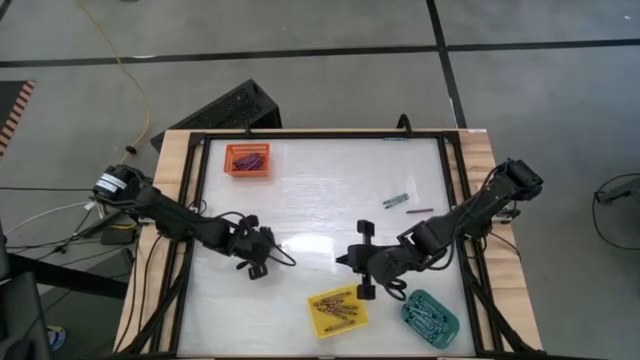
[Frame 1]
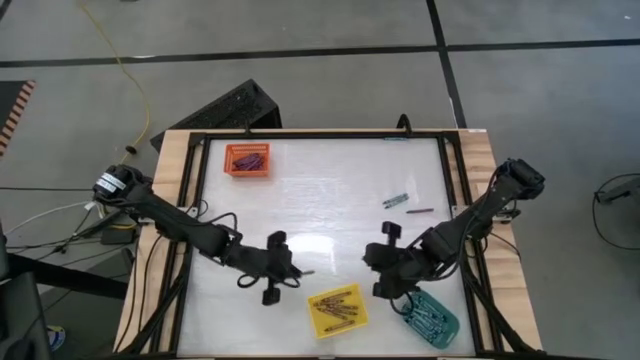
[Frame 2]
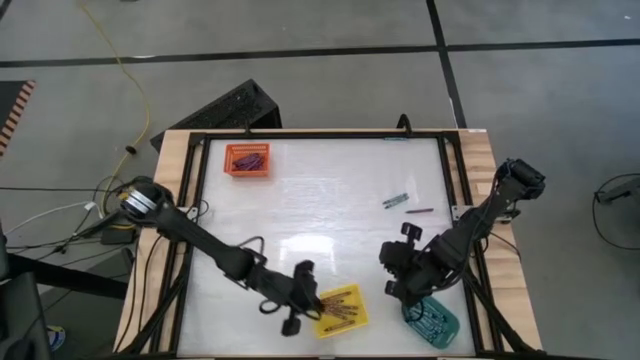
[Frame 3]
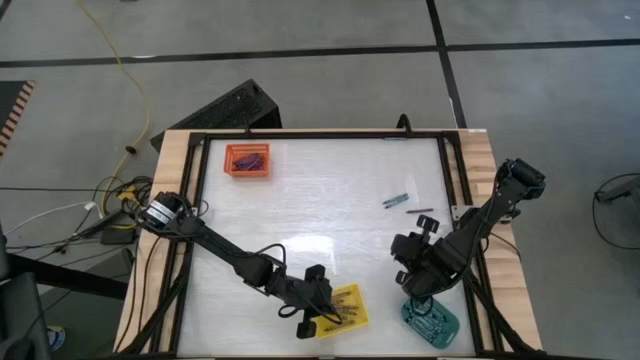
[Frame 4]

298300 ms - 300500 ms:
Task: Sort crayons
Put the brown crayon into the yellow bin

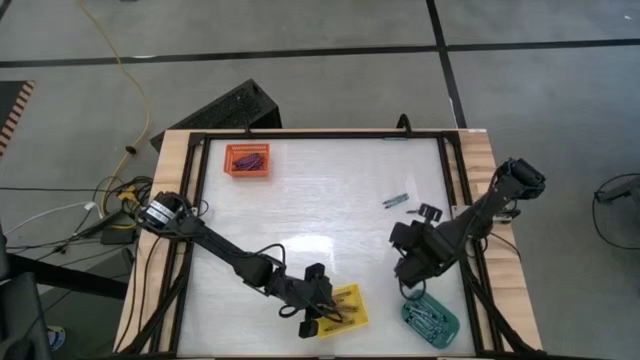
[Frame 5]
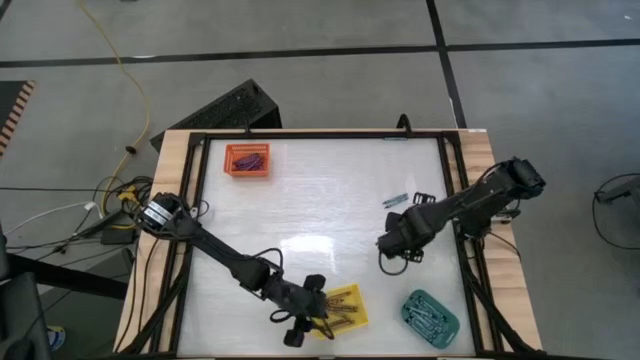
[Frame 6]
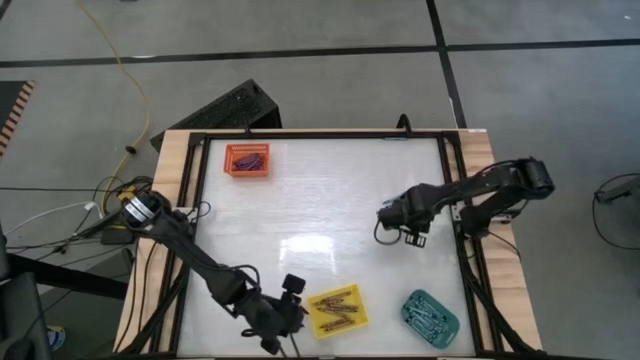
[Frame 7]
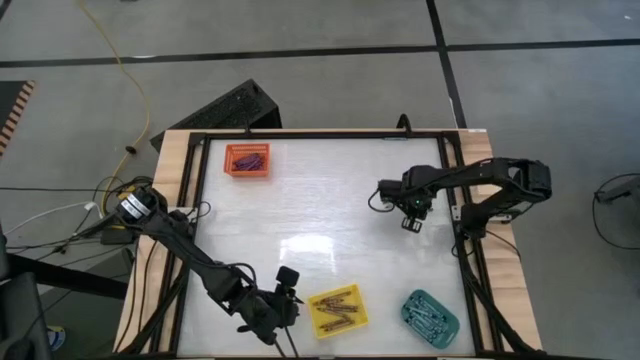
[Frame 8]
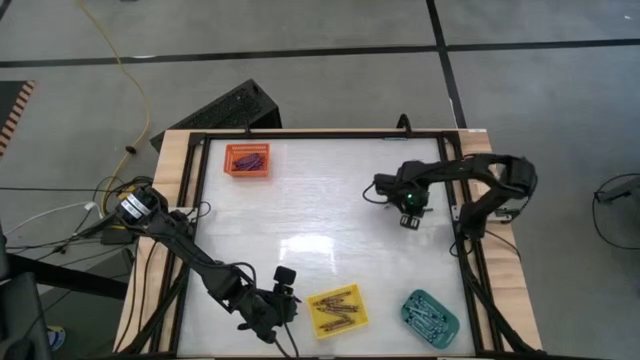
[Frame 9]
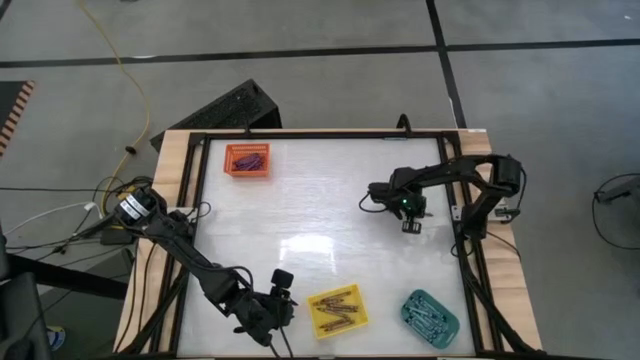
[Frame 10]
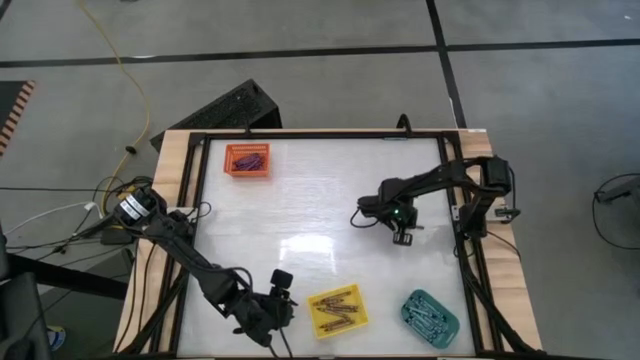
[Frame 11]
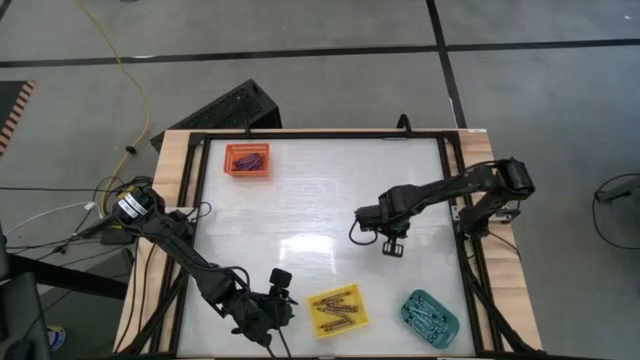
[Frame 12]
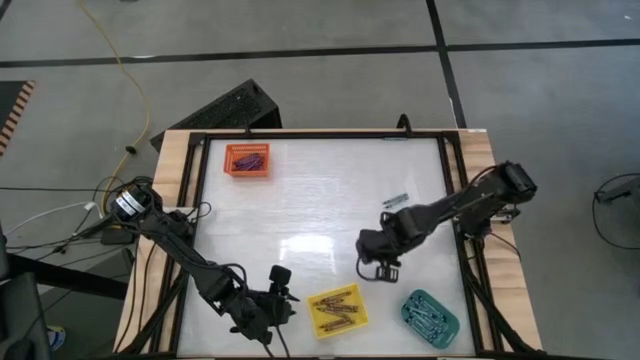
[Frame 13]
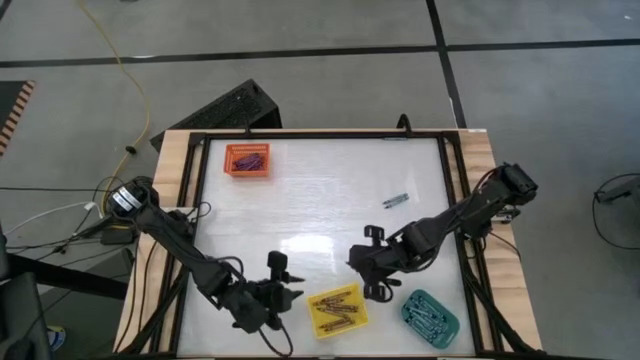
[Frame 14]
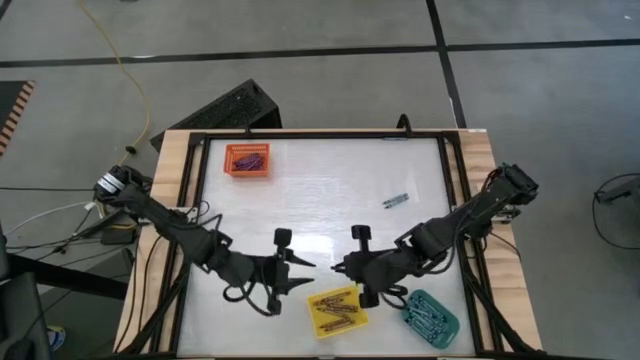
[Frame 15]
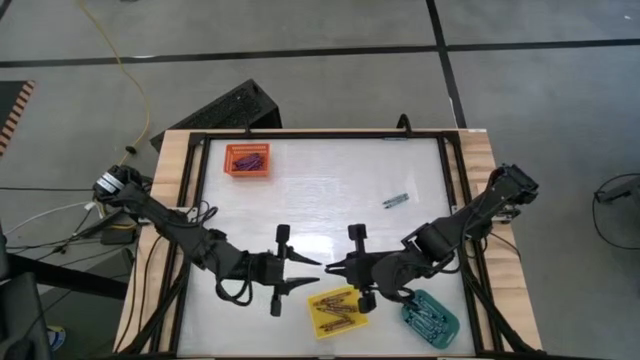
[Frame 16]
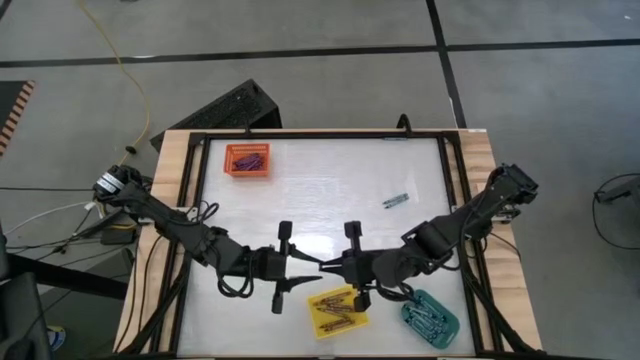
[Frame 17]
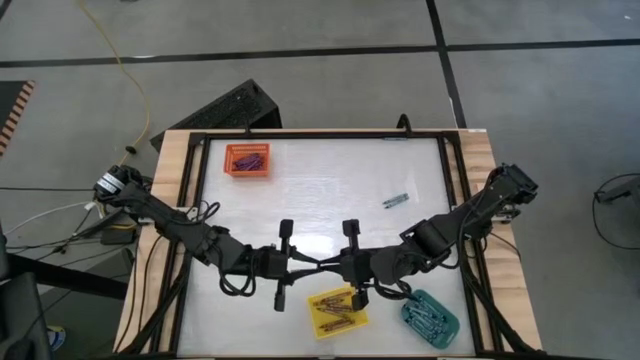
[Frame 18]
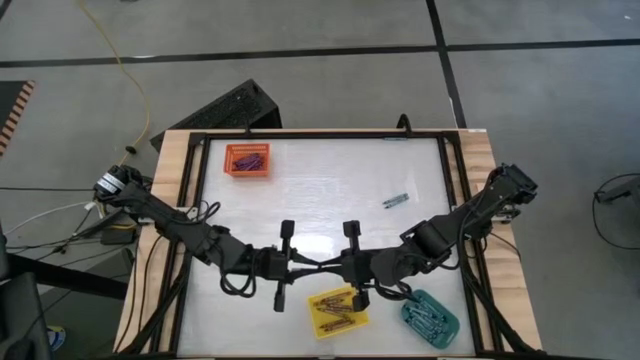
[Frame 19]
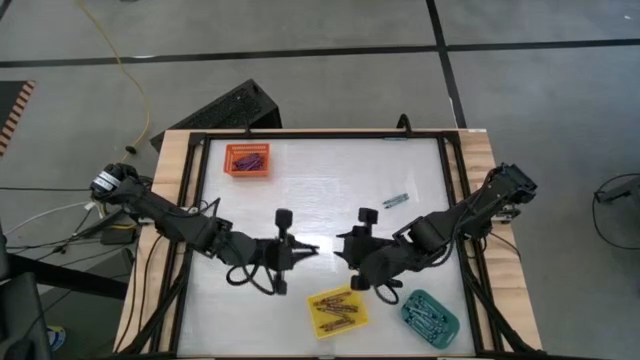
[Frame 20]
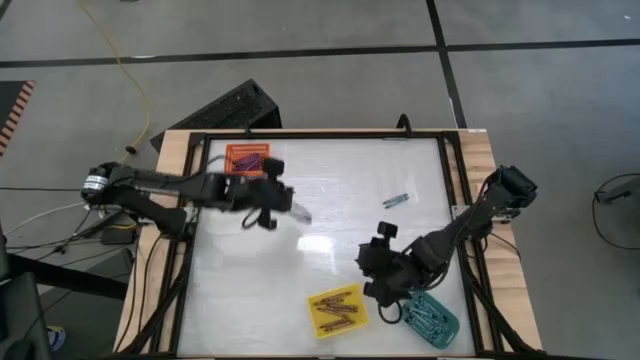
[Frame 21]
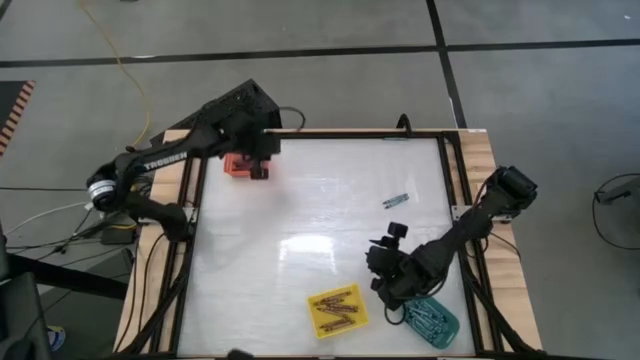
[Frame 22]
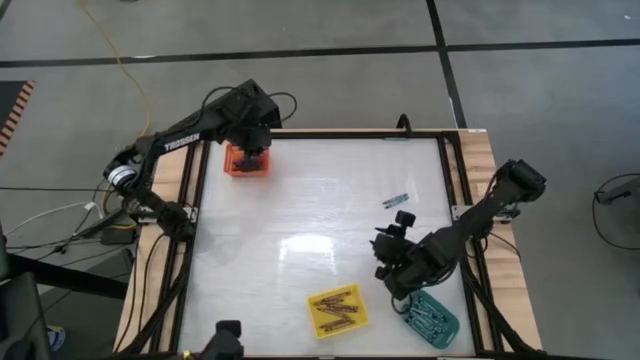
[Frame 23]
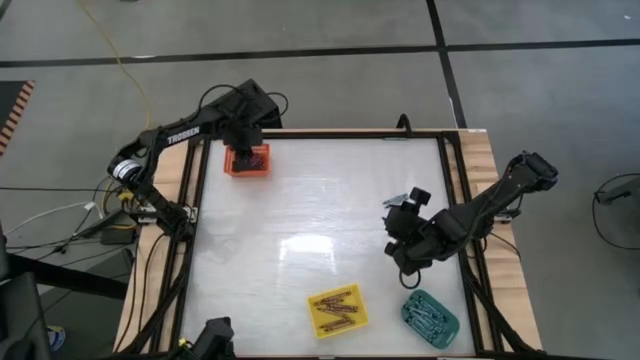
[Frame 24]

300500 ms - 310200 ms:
Put the purple crayon into the orange bin

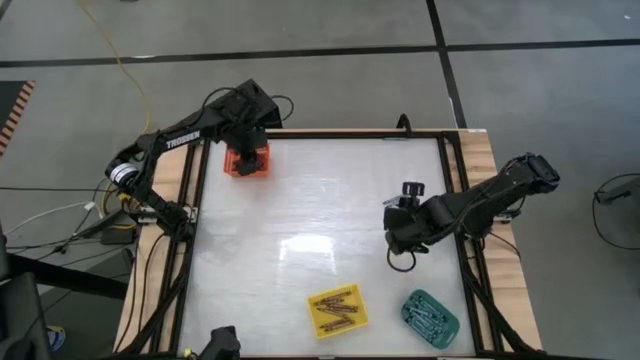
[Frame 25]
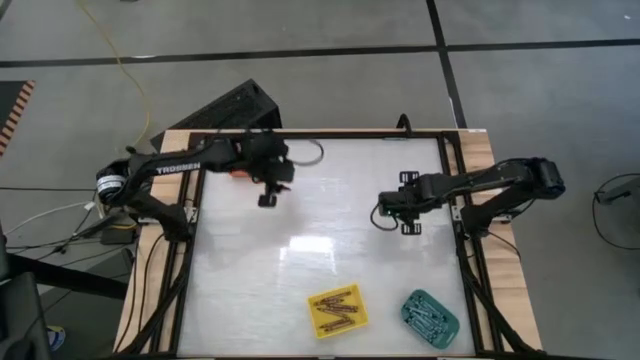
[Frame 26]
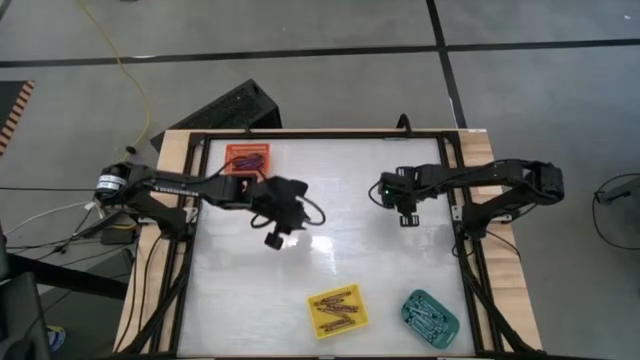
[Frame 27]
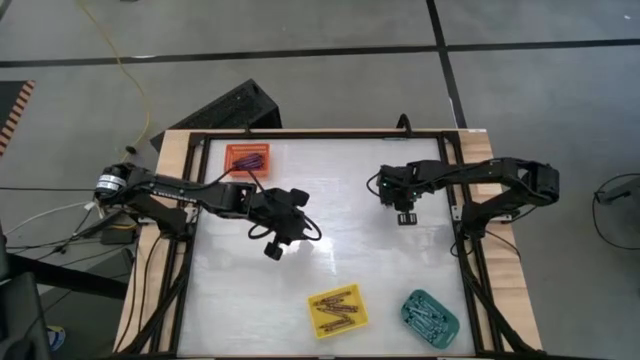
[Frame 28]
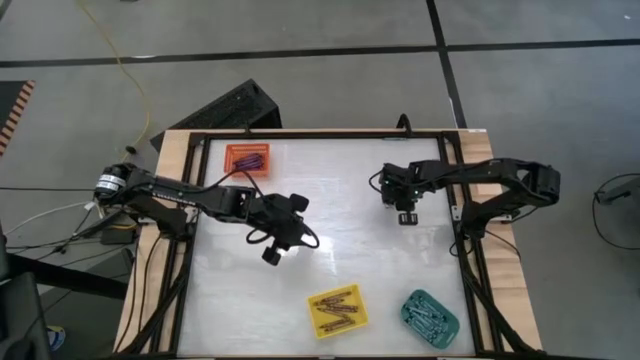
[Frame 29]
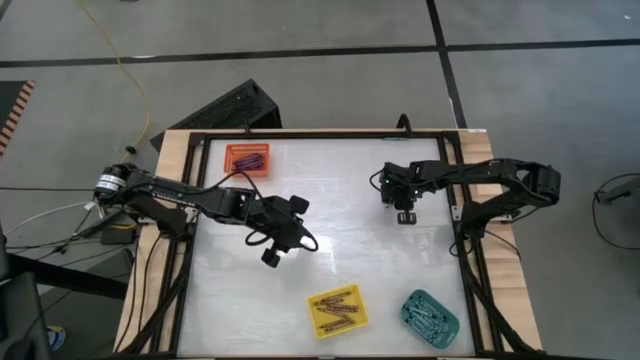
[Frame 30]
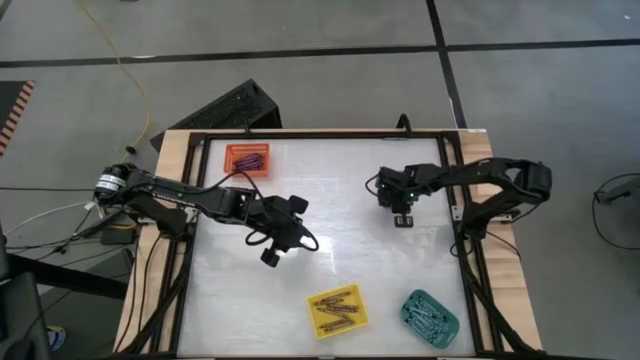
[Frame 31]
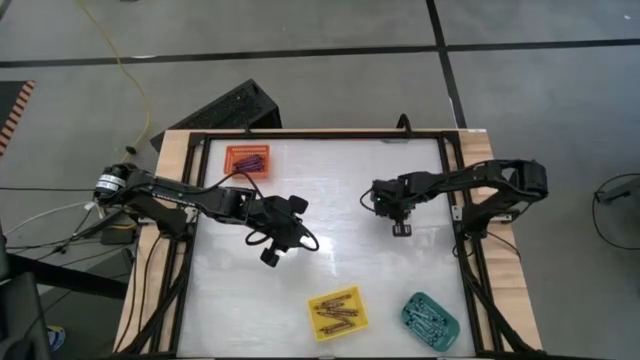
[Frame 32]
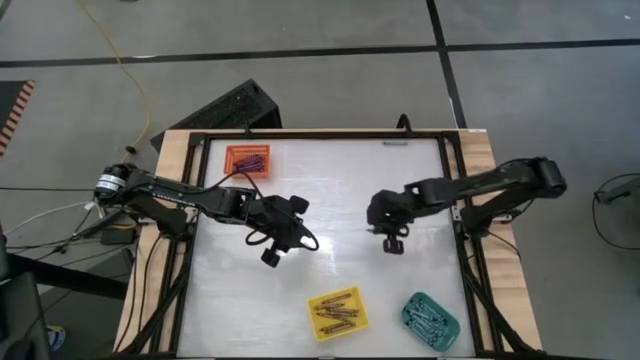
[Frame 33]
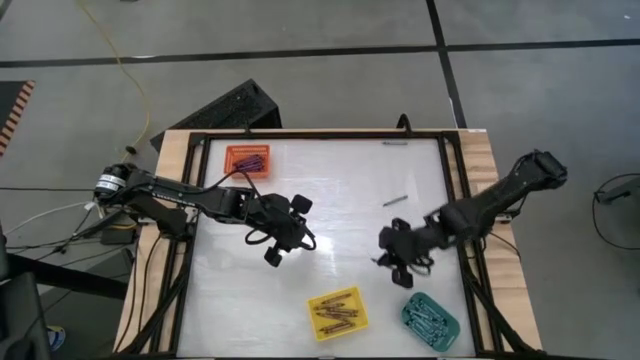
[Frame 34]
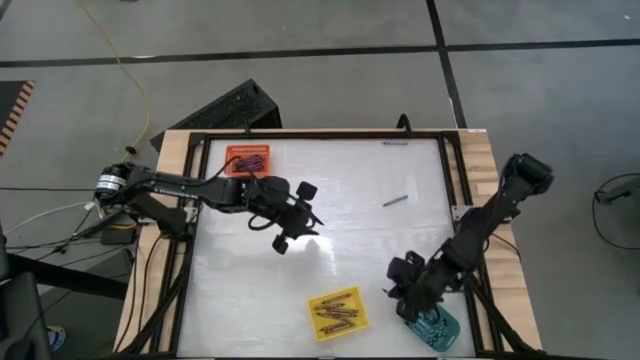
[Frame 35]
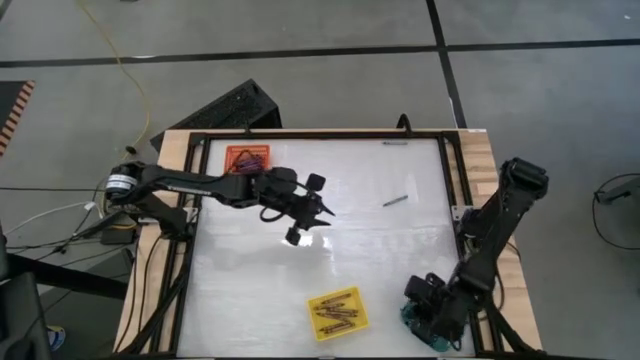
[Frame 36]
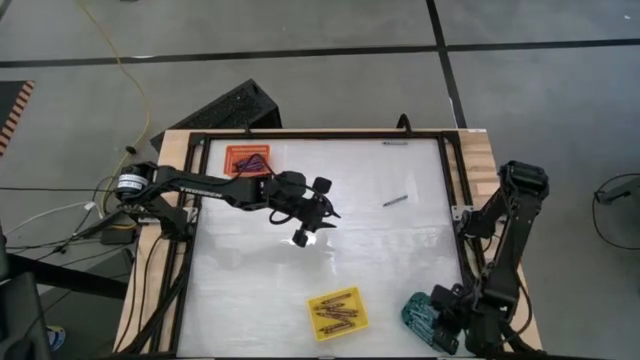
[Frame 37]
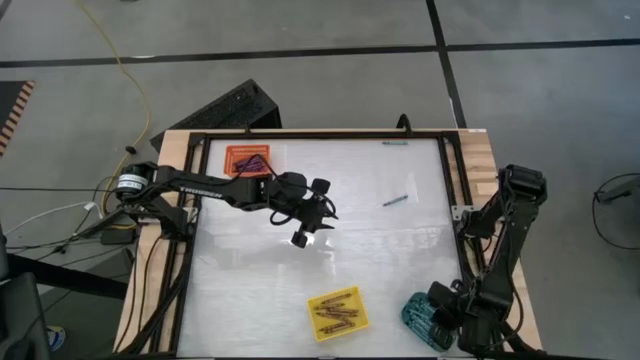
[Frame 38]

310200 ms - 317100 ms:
Put the blue crayon into the green bin
